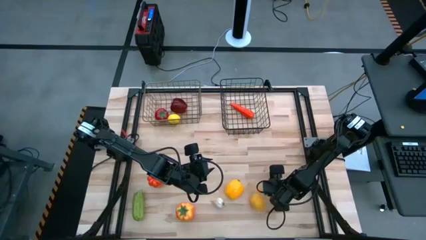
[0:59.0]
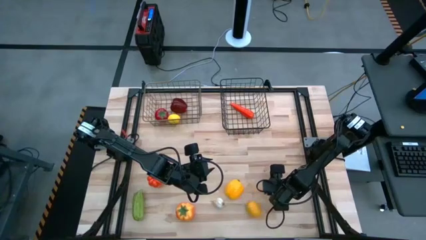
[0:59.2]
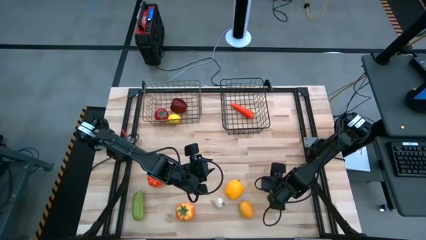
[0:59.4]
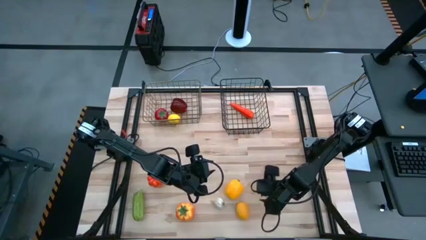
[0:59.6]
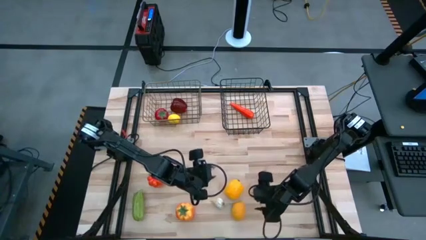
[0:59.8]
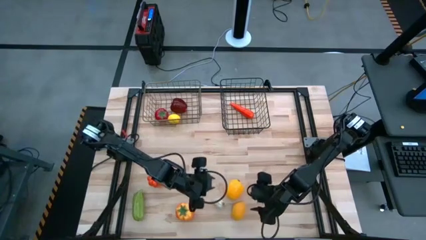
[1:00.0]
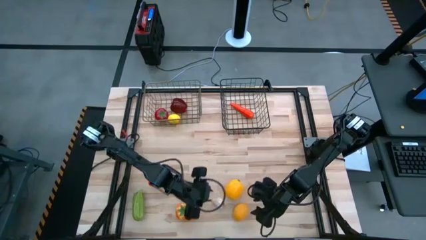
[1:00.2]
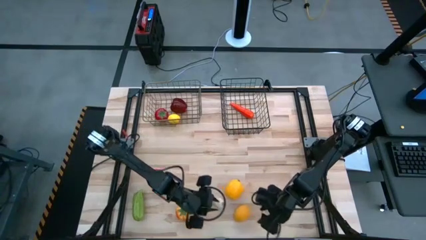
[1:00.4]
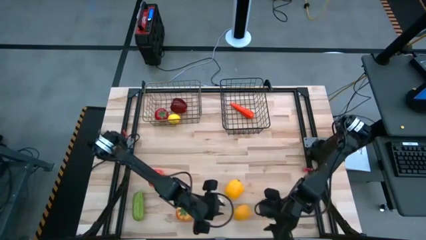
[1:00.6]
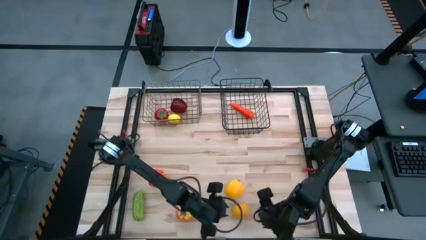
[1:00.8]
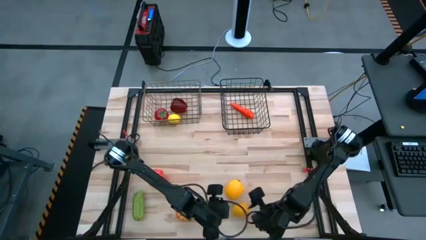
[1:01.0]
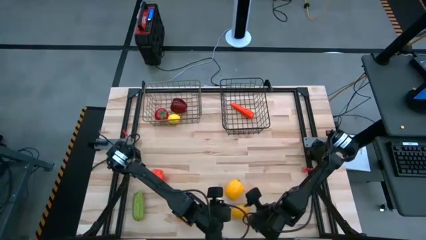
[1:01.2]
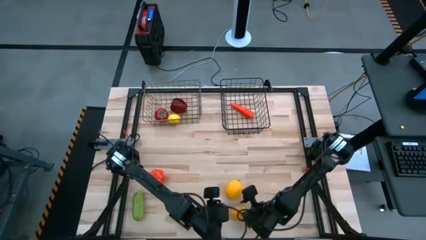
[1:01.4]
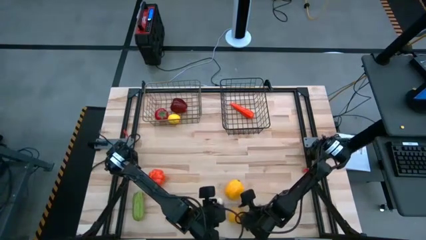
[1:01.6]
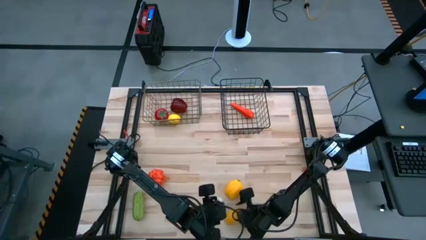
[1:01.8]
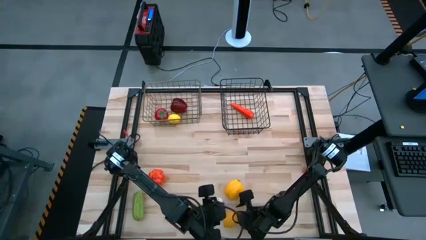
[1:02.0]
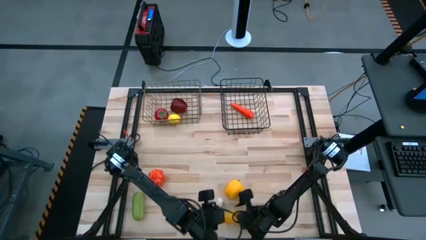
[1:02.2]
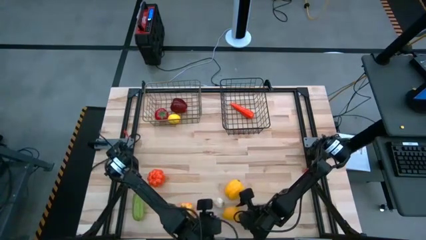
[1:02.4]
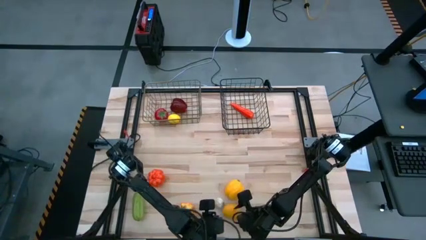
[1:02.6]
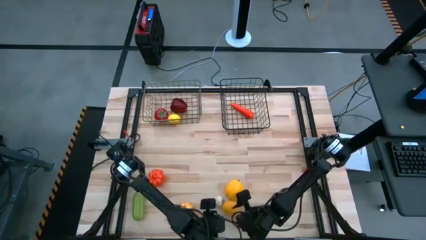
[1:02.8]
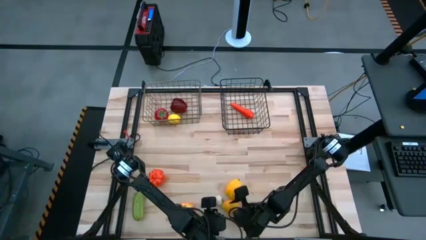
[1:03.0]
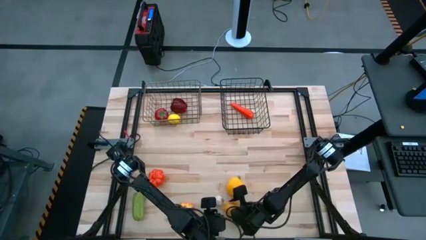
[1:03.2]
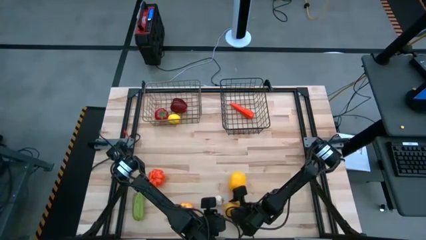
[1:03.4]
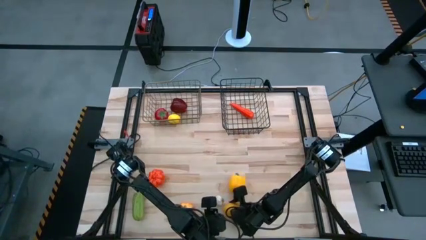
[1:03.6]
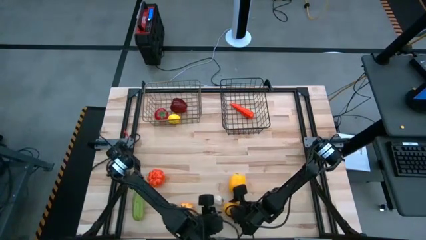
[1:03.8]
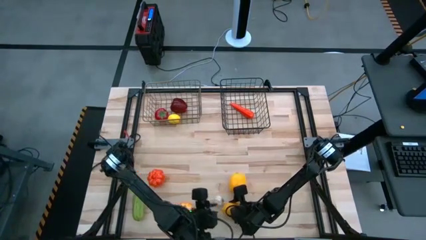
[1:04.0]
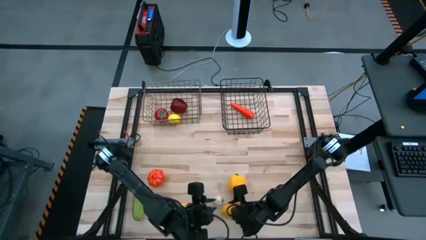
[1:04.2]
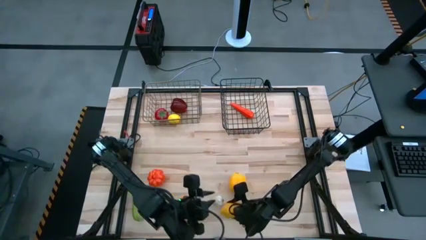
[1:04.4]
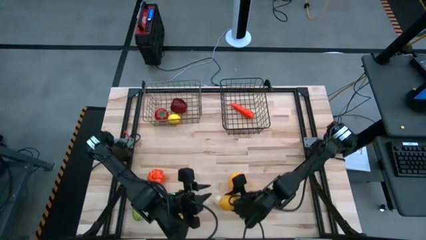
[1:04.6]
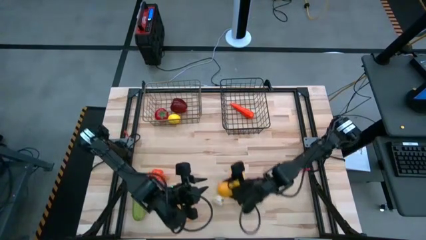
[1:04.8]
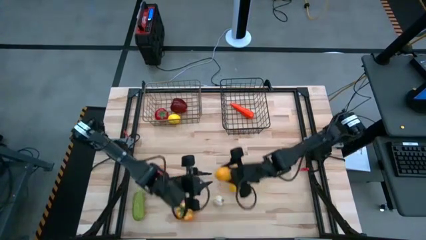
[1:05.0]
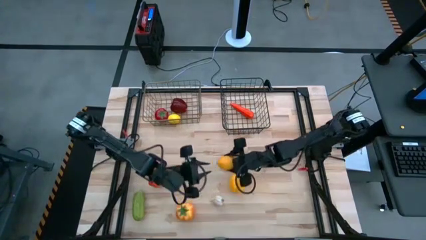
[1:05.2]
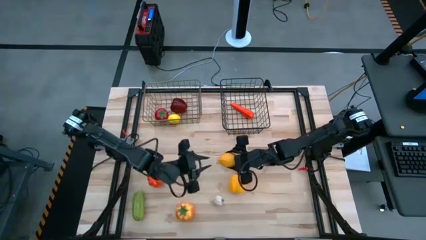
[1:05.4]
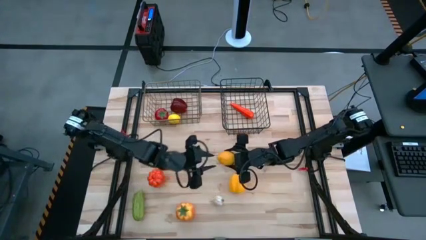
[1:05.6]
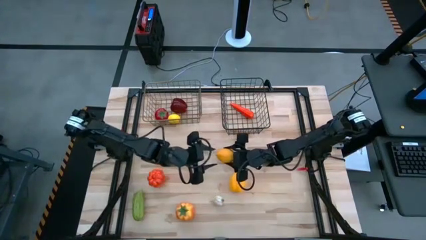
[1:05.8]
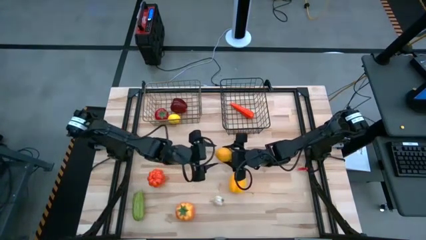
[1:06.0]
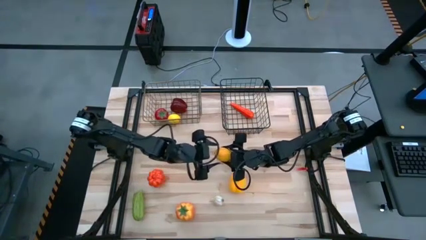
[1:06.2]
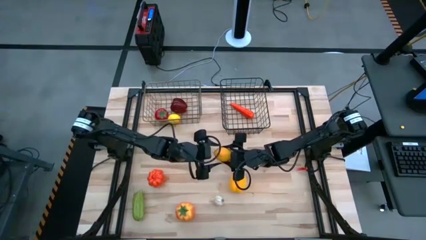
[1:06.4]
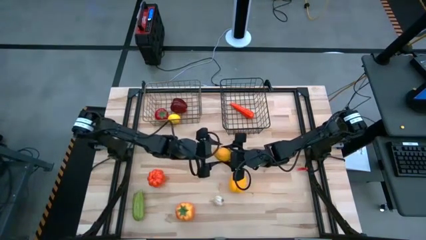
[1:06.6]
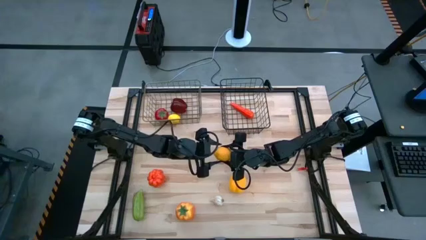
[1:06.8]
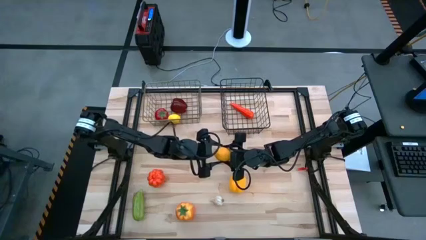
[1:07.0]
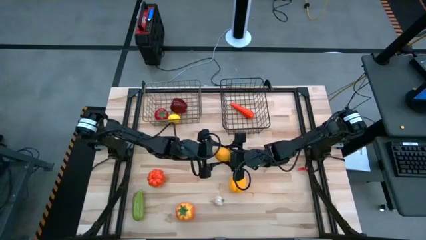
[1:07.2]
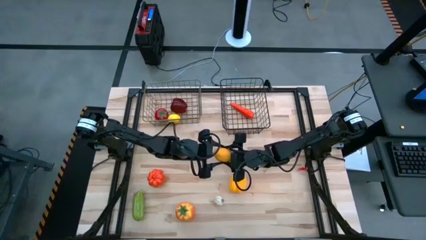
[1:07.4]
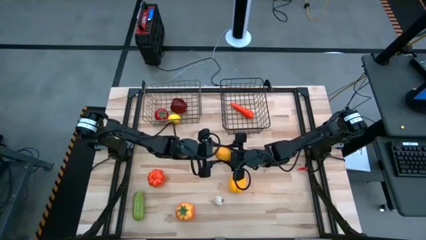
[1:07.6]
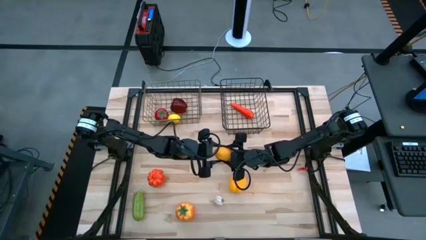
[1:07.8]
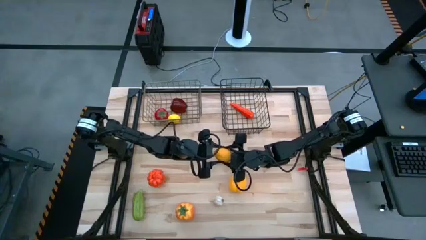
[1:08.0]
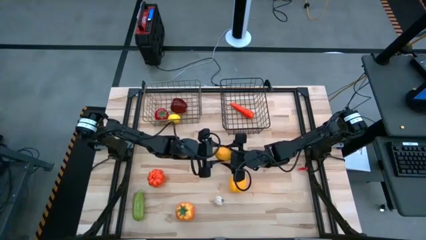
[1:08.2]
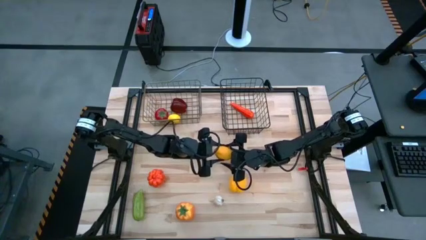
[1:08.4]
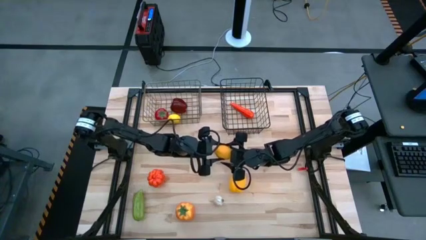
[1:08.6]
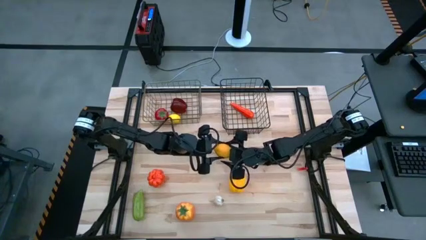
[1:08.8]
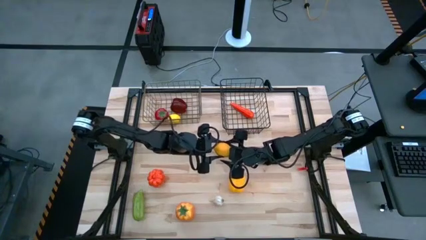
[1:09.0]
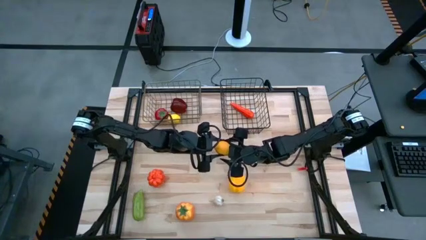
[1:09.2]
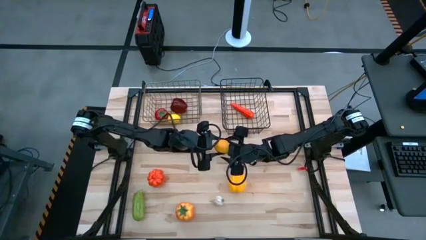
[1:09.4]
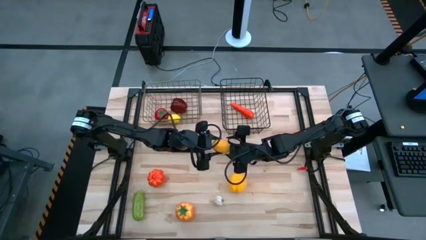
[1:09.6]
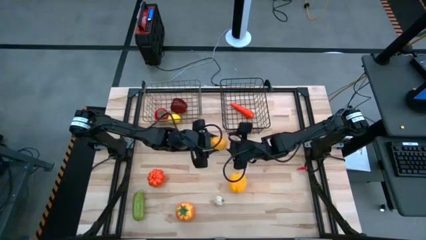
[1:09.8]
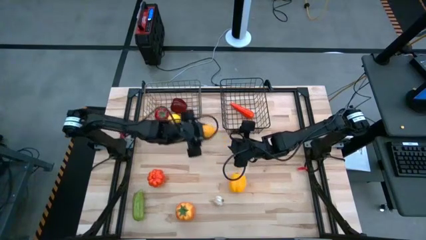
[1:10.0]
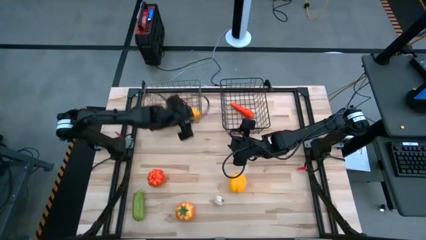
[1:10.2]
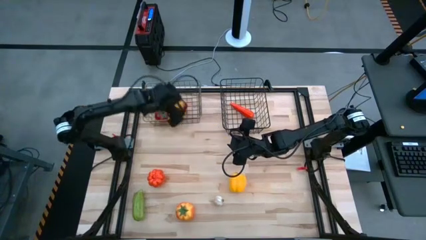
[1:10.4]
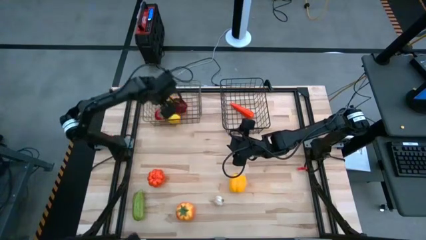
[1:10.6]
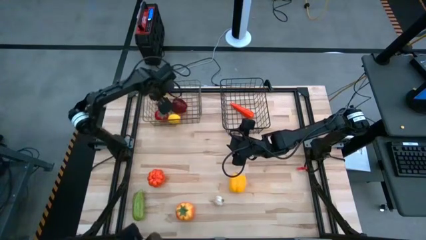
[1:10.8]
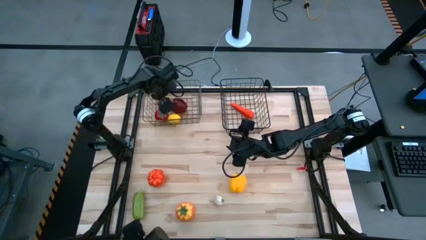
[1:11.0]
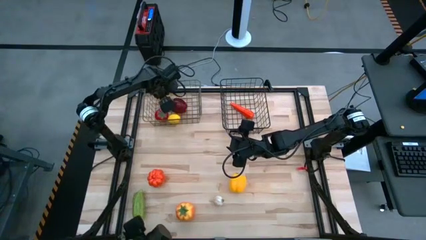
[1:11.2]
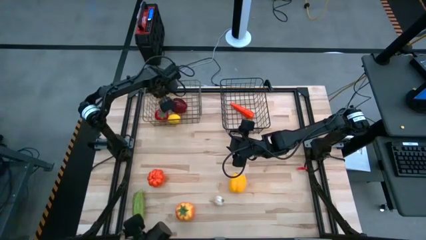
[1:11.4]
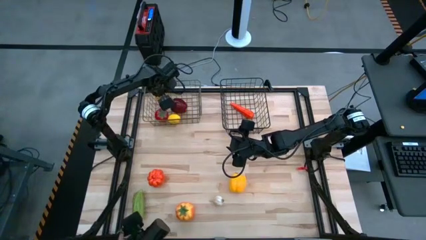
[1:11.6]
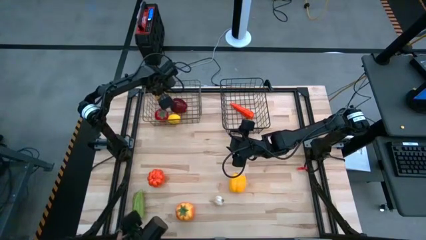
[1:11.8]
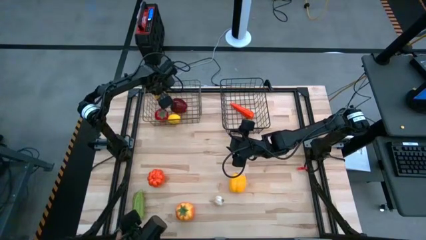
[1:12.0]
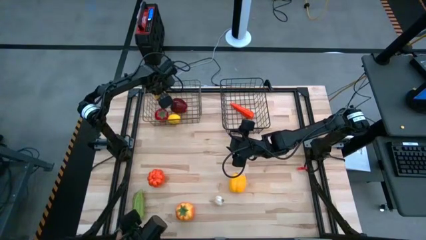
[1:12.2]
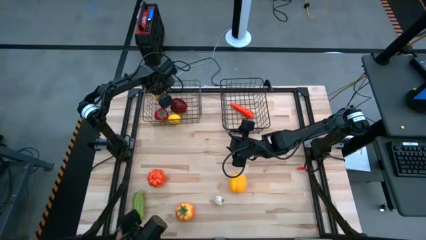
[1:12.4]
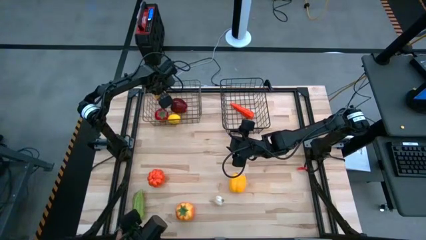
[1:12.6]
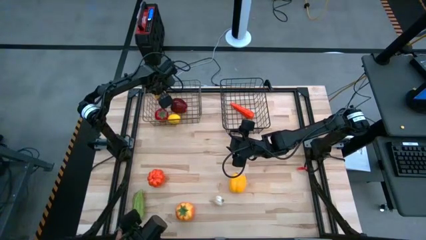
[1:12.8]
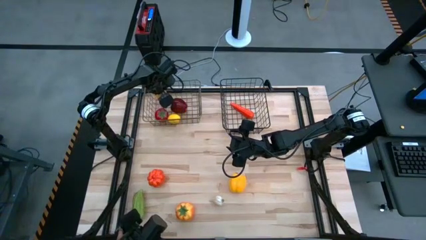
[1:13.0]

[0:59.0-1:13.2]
Task: Sort produce into baskets
Put the lemon into the gold wire basket

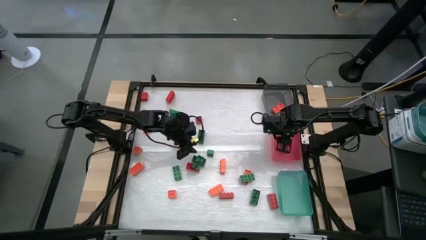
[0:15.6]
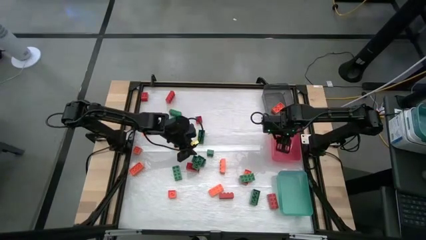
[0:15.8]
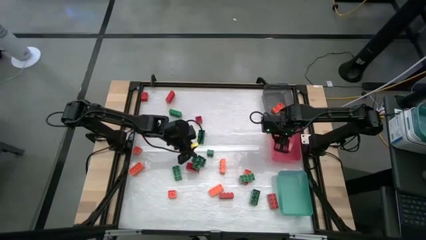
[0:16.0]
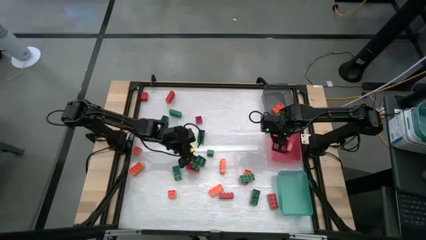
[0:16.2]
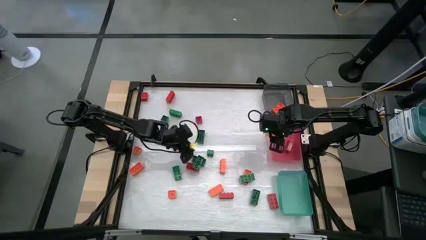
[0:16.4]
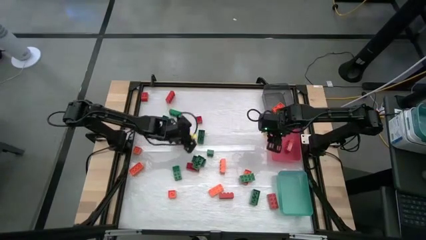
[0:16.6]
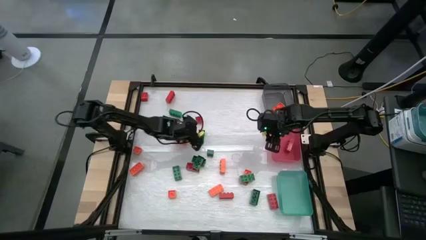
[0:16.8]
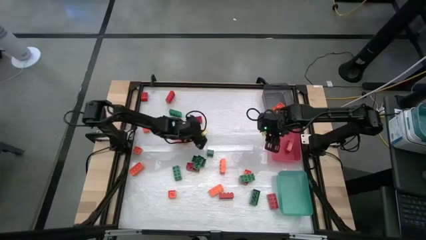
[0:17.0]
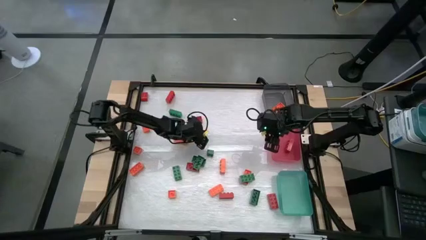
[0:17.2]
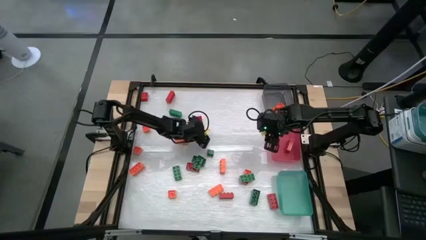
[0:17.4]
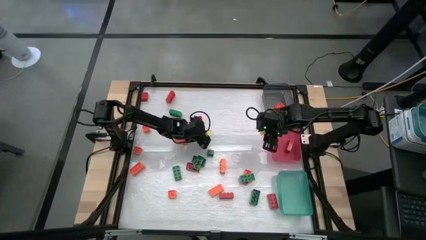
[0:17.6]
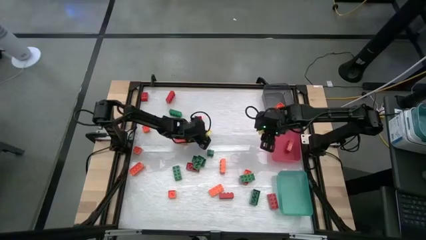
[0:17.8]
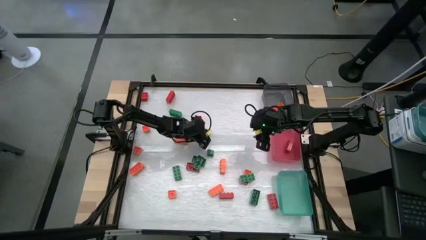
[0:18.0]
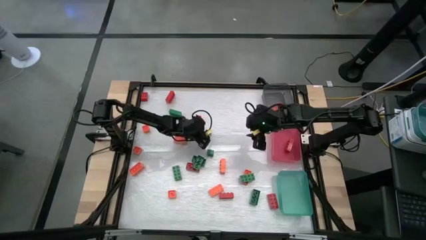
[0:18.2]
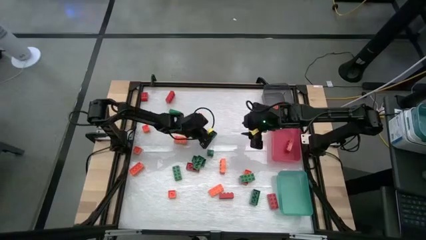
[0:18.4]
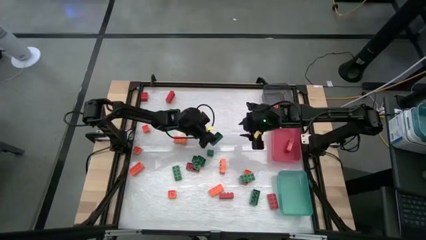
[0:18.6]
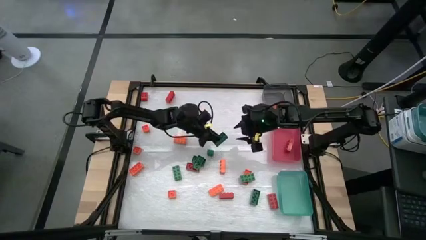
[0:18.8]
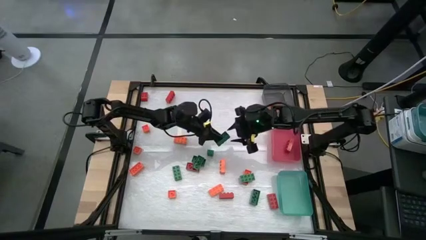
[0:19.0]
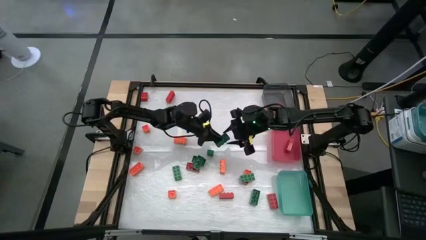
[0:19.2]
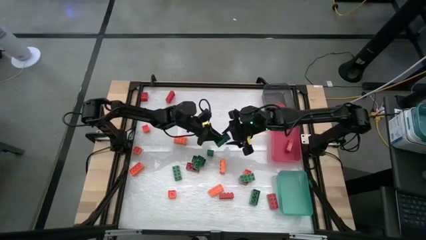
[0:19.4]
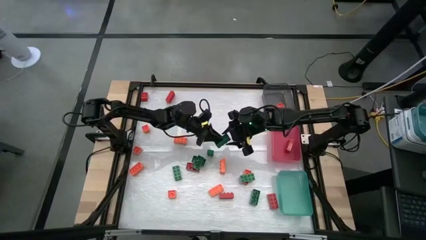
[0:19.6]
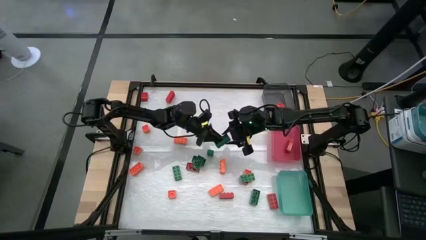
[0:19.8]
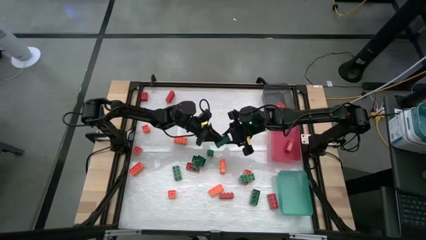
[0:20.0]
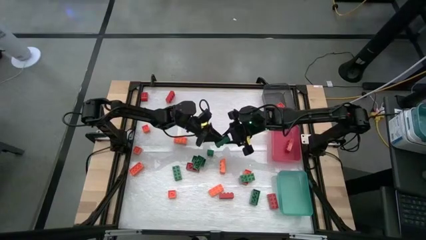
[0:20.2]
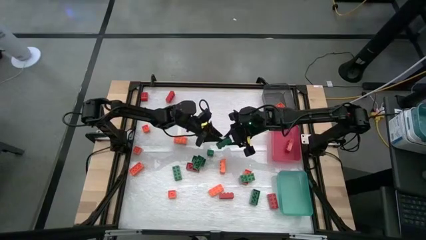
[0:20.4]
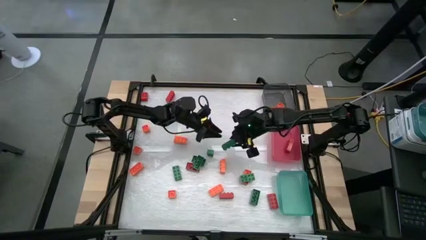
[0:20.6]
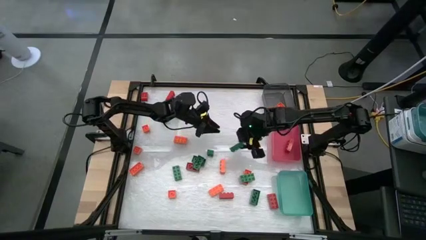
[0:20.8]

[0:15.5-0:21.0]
Task: Sort blocks
Put the green game piece into the blue bin
